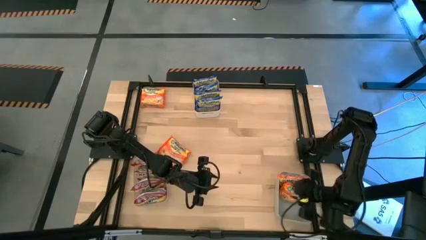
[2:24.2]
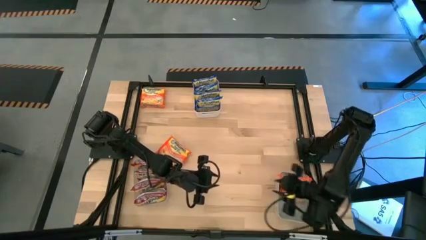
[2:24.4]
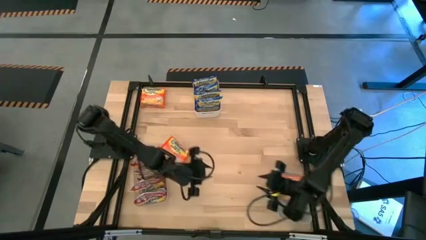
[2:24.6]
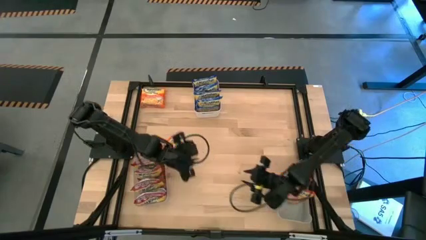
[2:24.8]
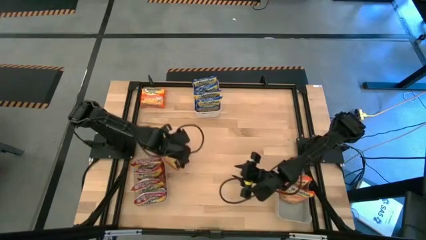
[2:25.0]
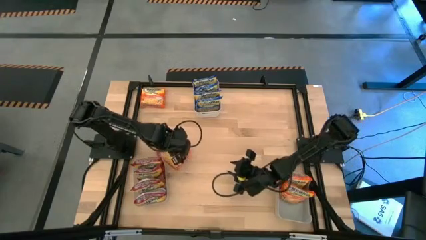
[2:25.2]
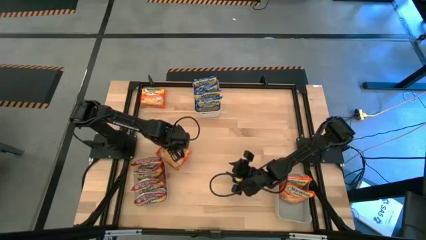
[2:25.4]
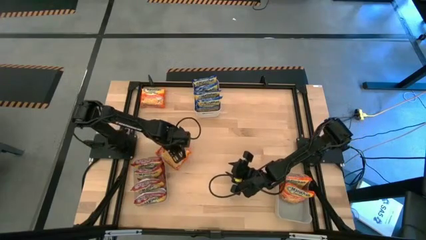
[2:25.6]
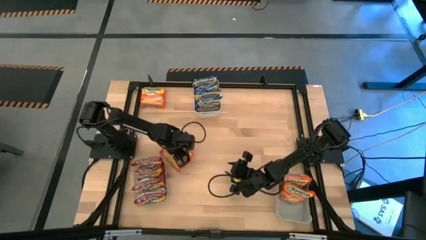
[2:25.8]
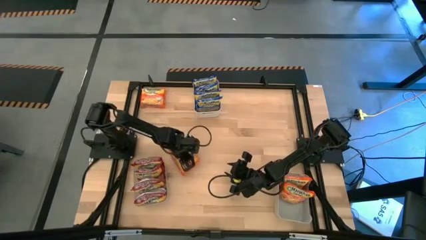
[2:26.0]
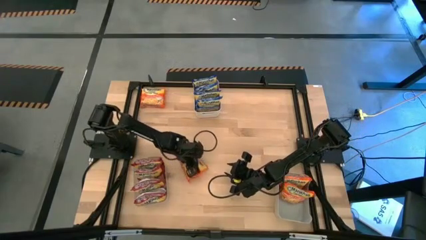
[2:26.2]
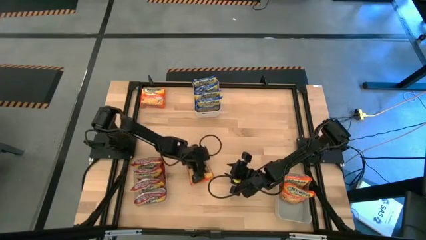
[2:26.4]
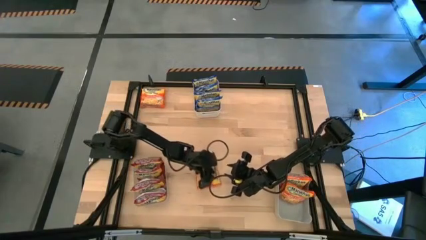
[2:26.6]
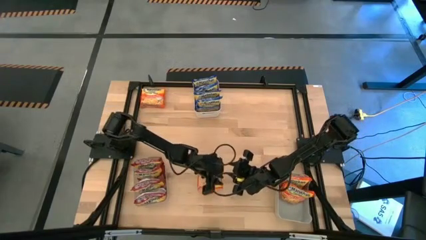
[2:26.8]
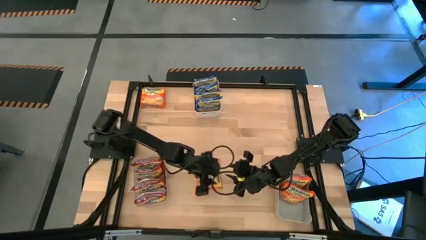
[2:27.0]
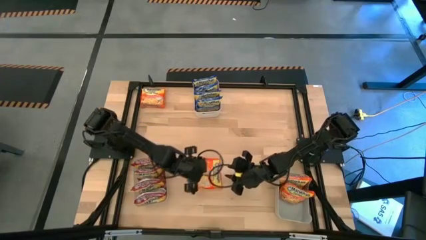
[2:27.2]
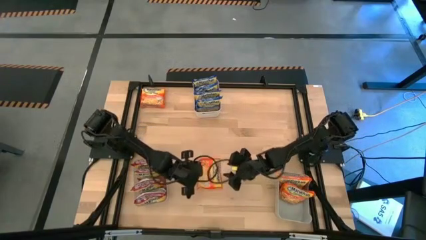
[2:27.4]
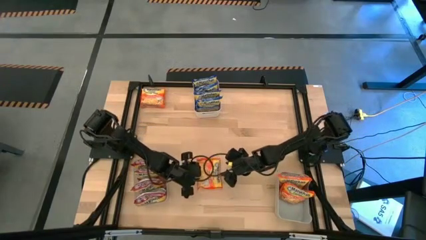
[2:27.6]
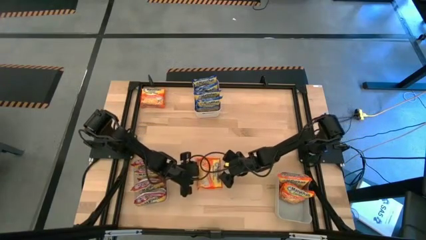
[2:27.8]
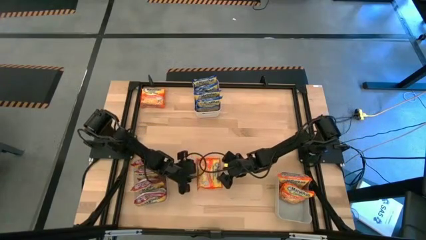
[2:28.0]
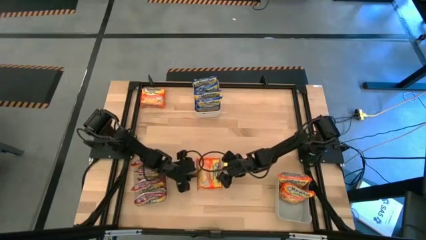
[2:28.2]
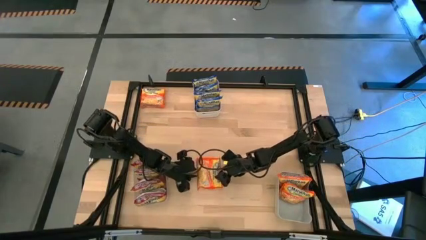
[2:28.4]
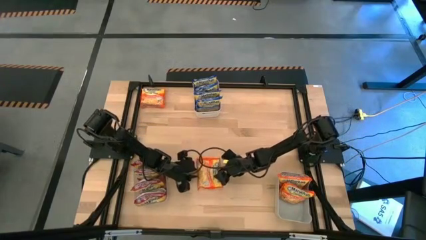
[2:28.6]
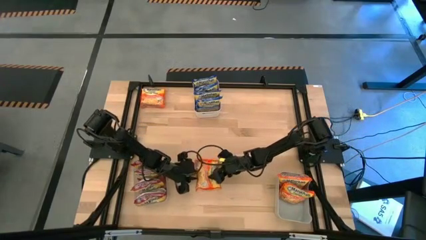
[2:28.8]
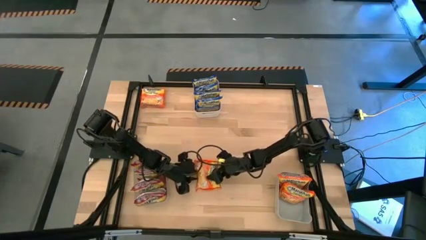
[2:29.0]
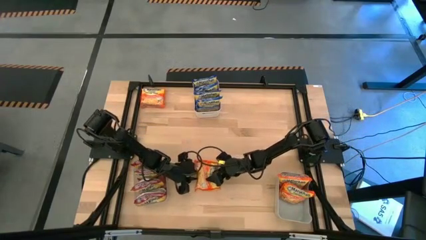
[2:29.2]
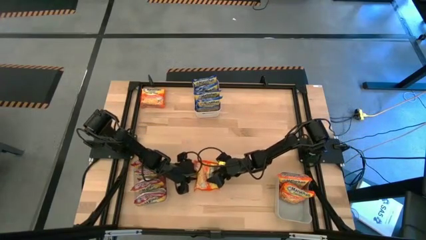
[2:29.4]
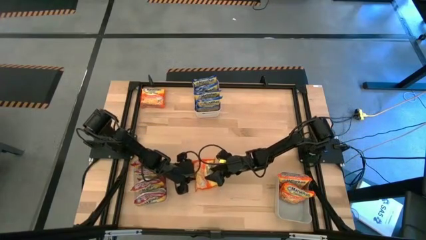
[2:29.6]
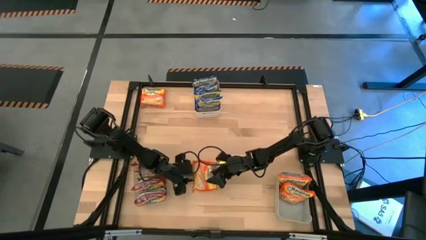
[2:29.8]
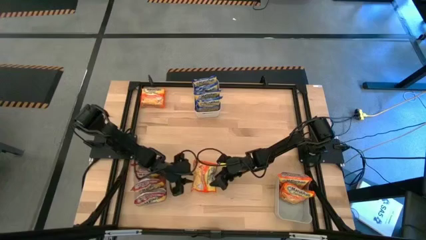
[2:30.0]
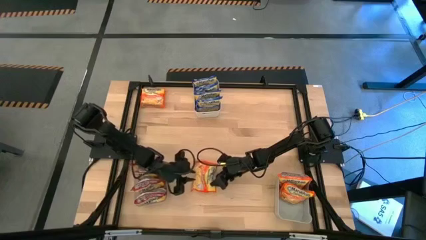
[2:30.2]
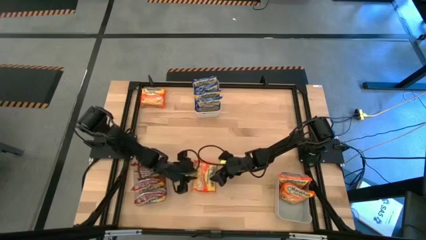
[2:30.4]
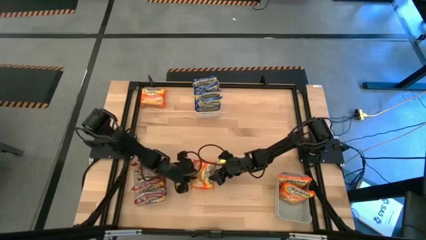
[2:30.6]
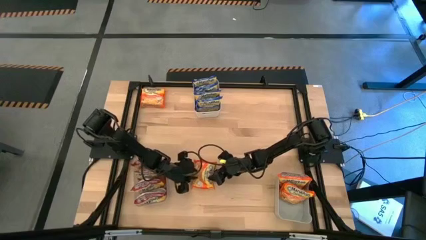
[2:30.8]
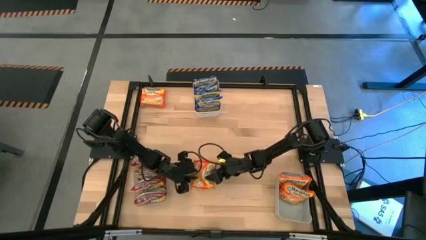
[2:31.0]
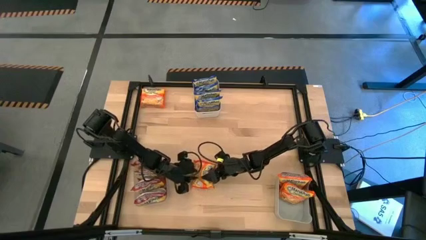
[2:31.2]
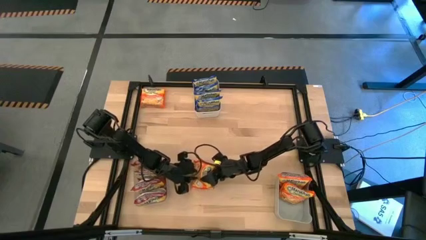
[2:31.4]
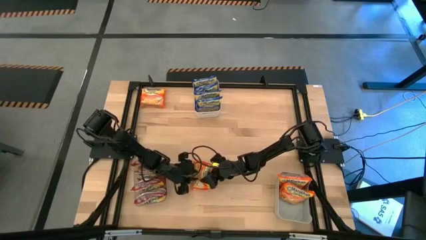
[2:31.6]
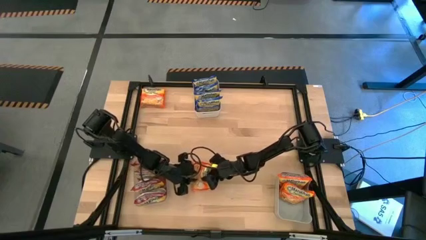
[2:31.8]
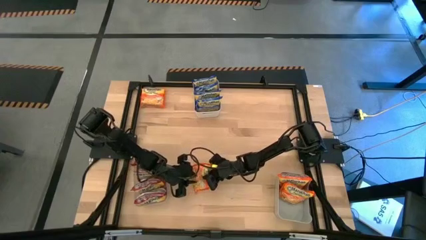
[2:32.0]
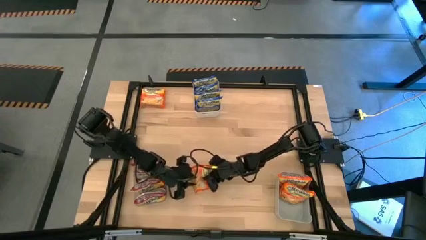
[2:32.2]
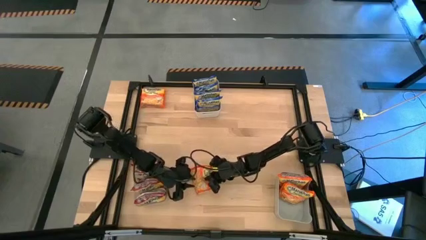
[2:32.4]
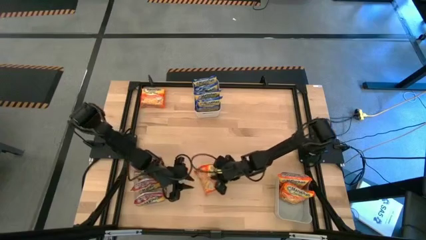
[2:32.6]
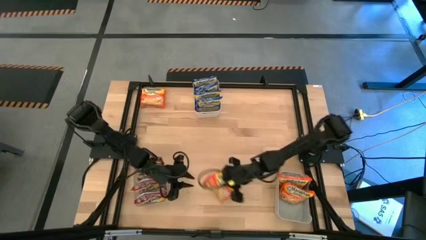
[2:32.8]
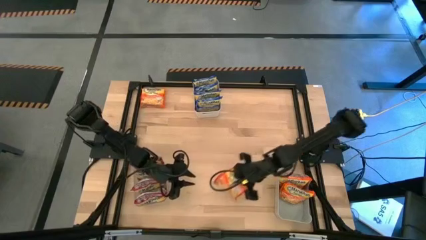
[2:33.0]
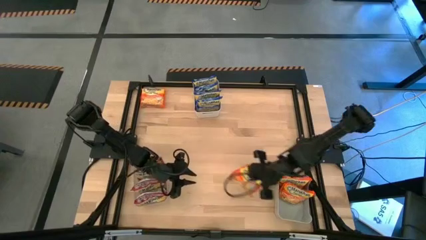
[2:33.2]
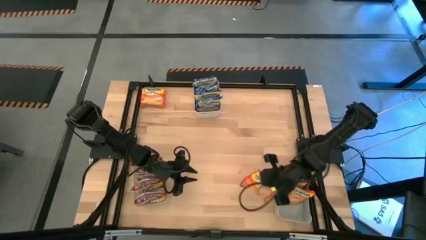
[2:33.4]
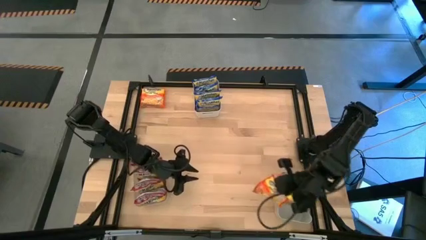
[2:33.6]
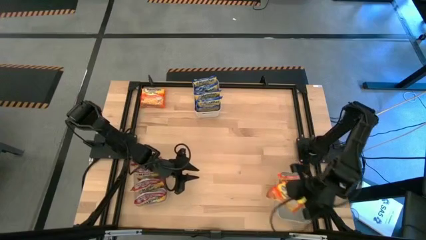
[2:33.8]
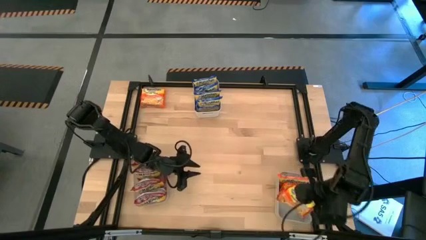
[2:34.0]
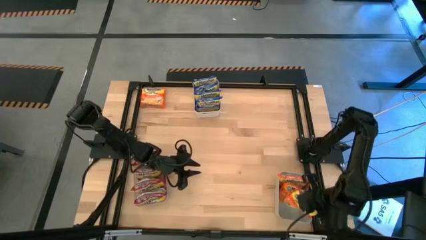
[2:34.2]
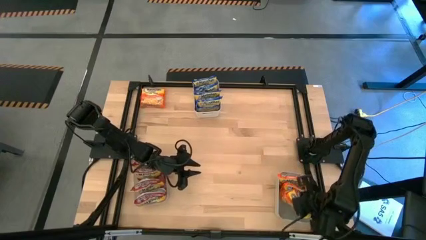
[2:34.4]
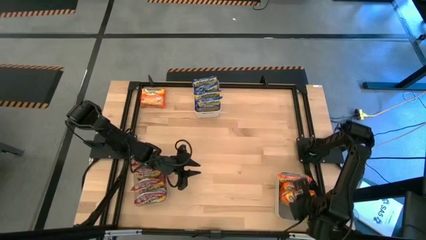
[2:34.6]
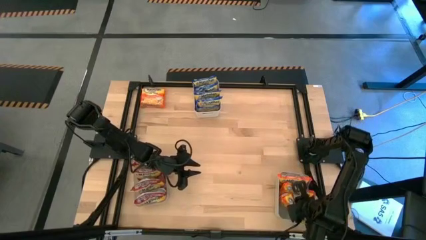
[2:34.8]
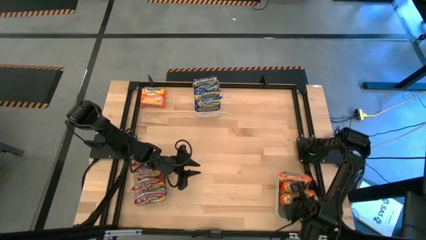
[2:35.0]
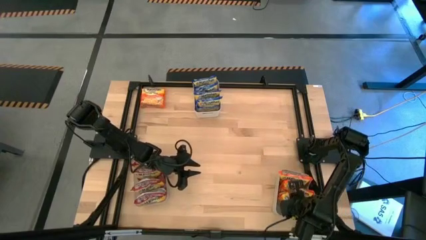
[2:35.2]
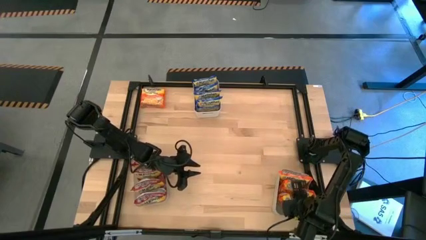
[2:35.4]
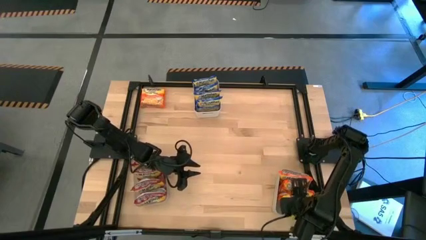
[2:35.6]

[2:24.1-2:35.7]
Task: Sort Maruchan noodles
Put the orange noodle pack into the gray bin

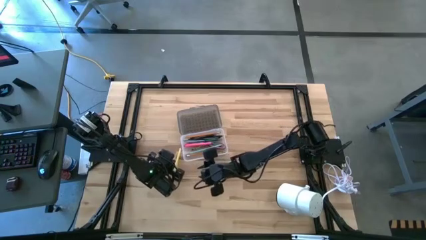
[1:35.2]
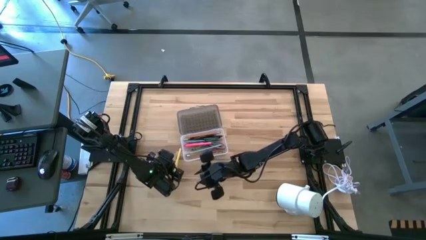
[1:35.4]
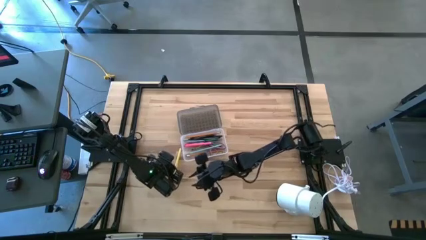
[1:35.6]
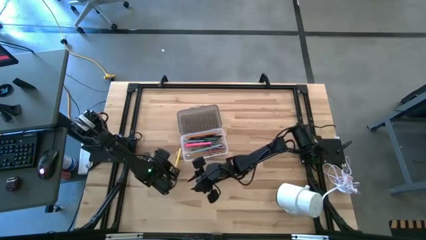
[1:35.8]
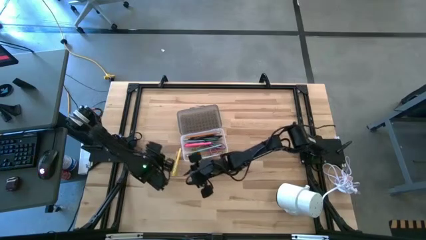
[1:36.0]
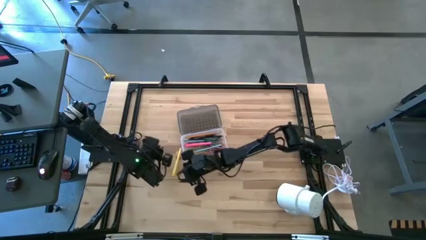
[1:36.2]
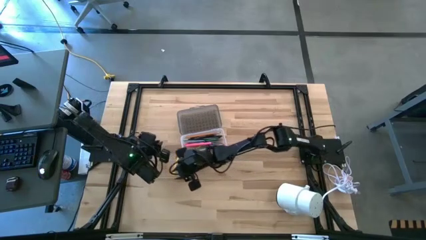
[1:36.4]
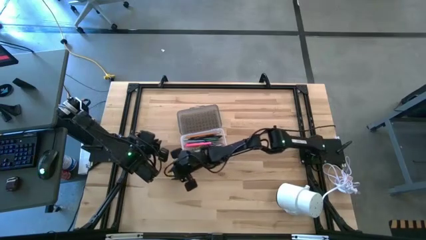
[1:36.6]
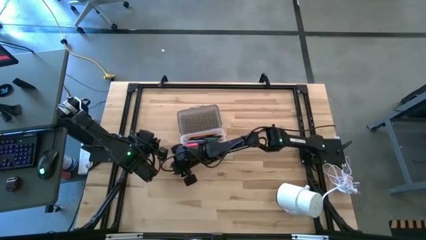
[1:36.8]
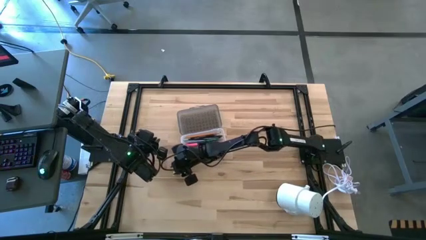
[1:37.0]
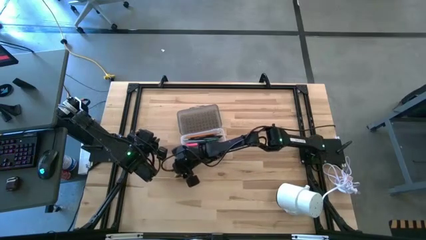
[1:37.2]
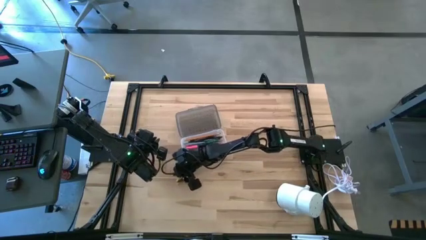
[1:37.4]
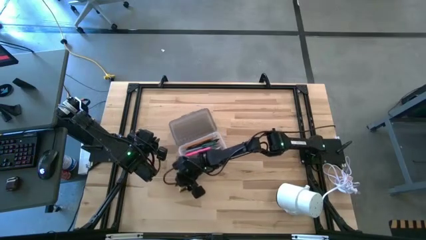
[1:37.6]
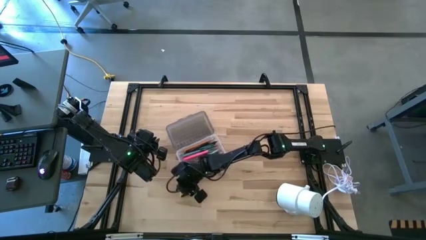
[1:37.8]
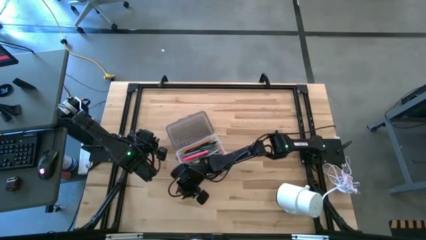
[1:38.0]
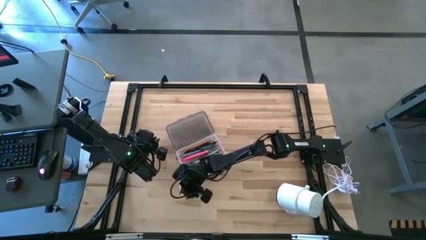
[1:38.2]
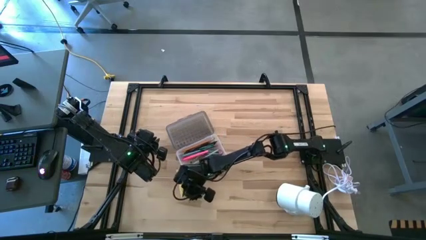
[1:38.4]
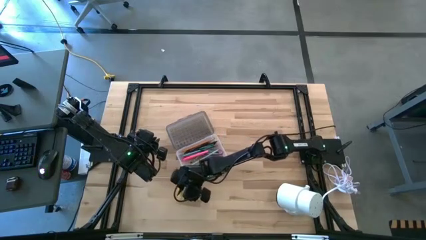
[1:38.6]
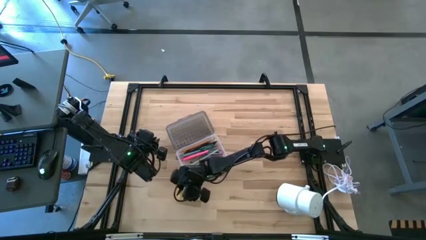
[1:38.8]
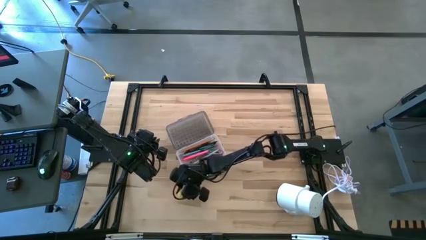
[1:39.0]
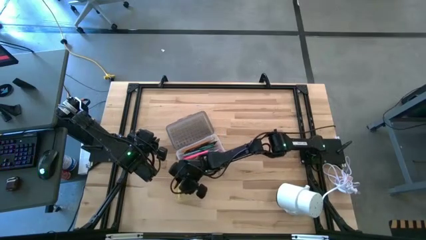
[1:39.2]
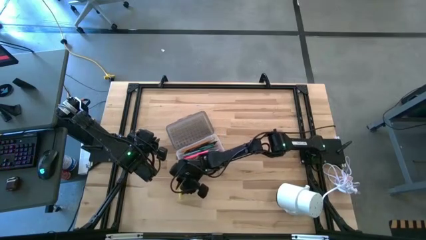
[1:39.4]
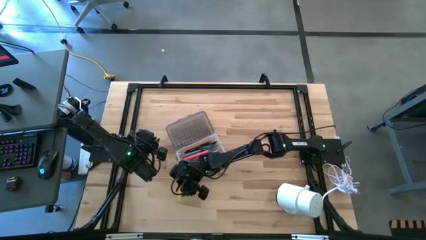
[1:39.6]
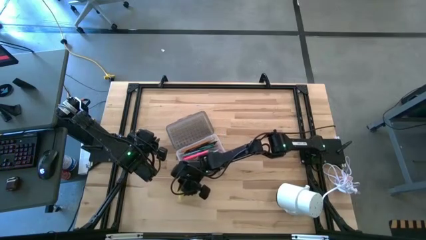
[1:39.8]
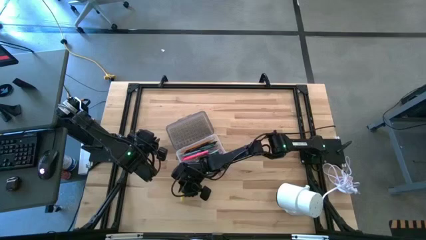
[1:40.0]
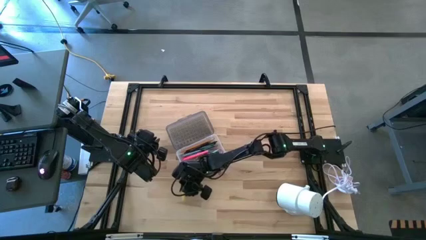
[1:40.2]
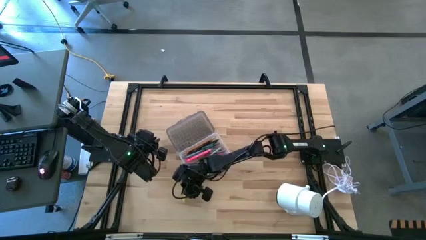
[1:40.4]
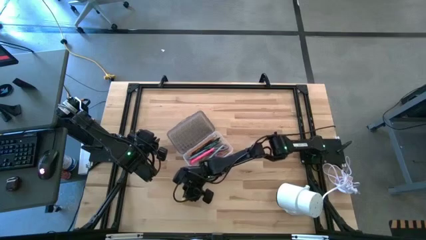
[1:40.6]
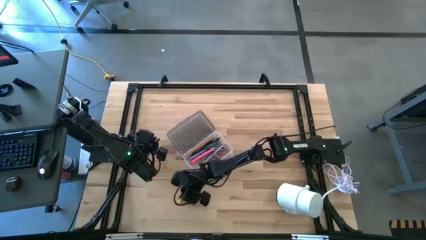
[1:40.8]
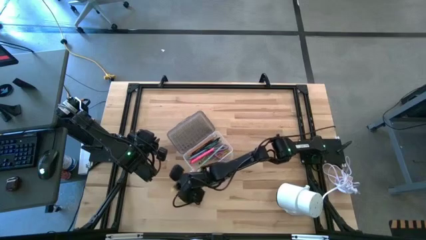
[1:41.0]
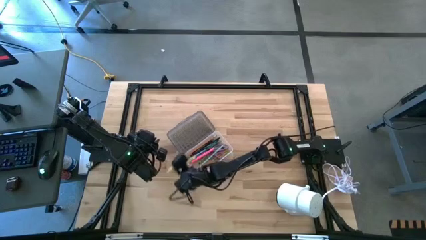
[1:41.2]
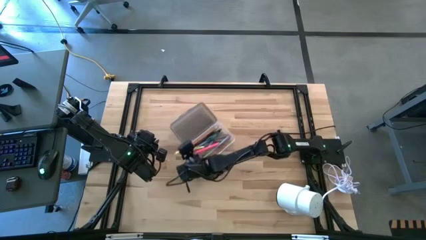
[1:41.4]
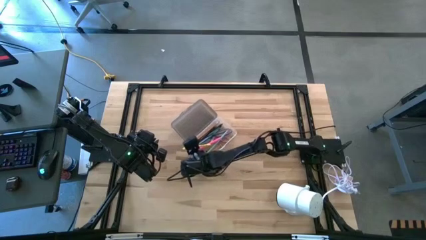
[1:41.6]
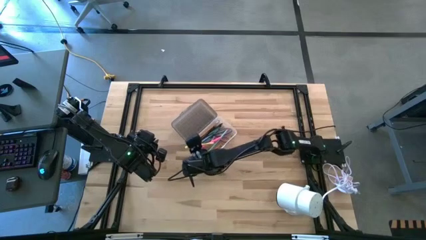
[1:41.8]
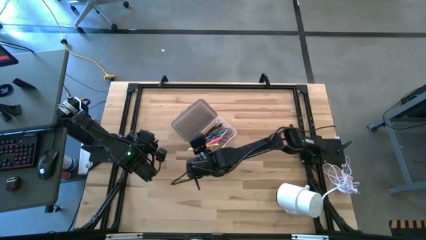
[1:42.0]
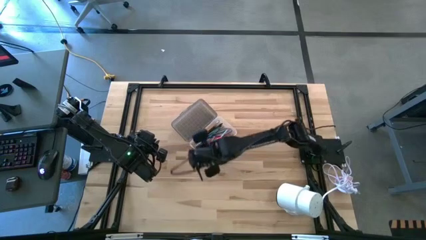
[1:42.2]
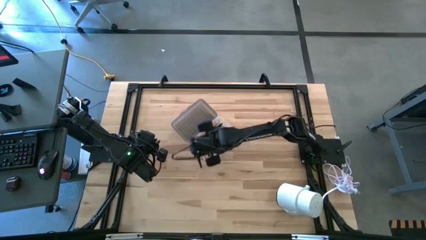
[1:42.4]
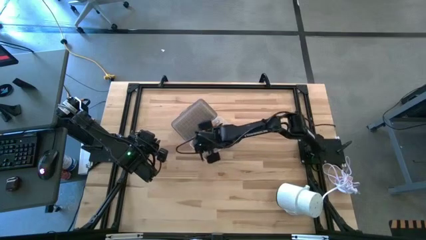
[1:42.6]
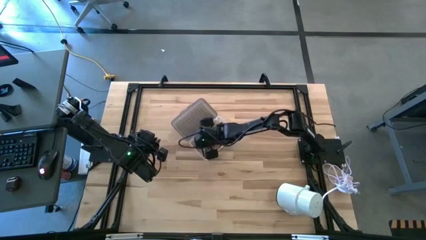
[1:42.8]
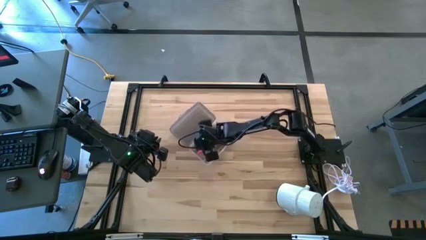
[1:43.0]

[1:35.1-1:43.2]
Task: Pick & place school supplies into a supply box
Put the yellow pen into the gray supply box
